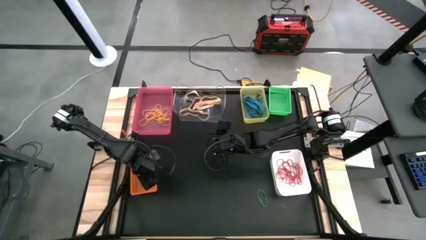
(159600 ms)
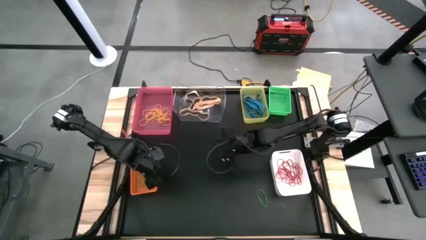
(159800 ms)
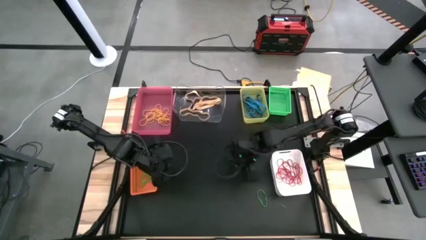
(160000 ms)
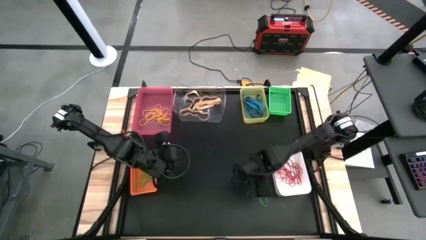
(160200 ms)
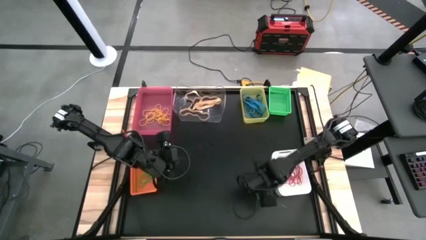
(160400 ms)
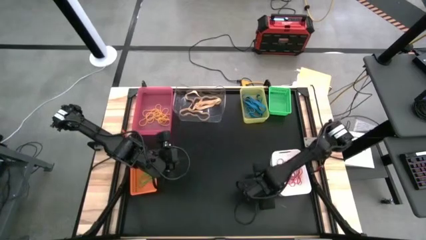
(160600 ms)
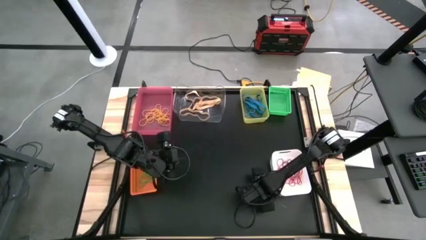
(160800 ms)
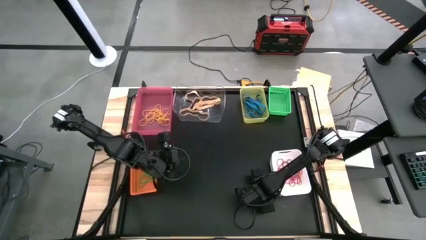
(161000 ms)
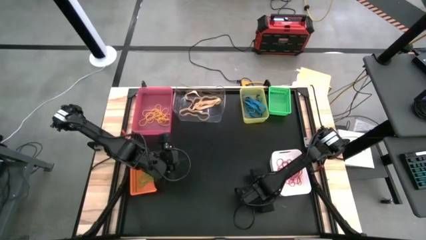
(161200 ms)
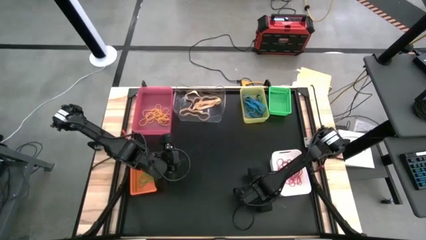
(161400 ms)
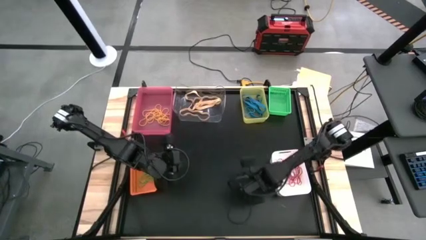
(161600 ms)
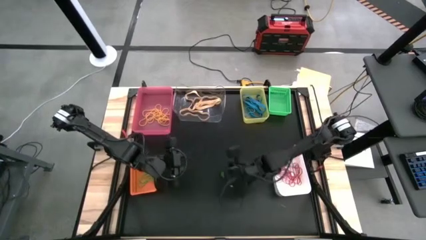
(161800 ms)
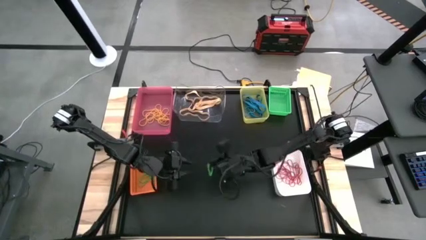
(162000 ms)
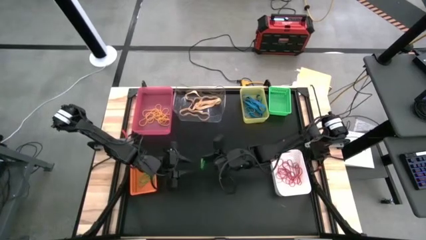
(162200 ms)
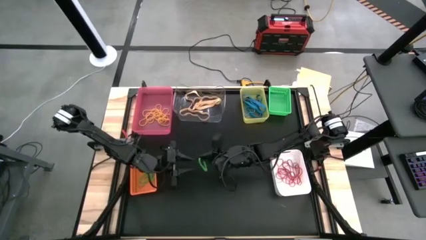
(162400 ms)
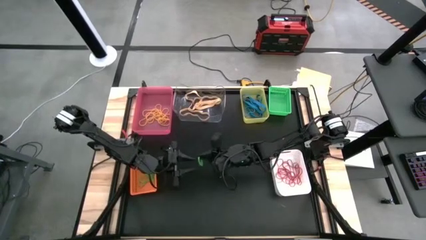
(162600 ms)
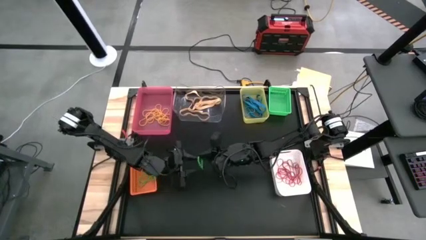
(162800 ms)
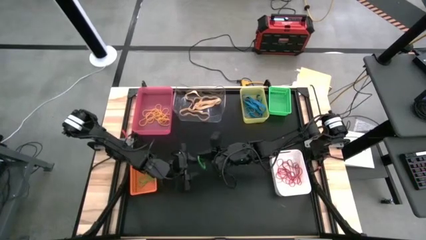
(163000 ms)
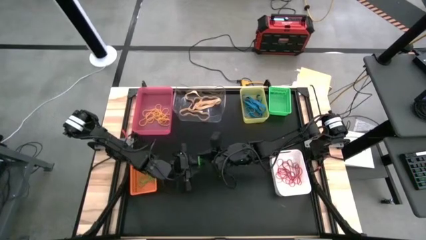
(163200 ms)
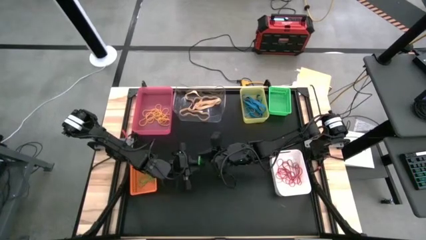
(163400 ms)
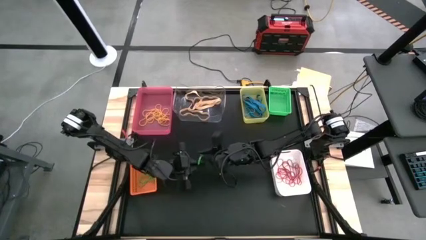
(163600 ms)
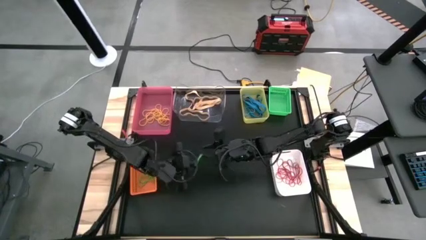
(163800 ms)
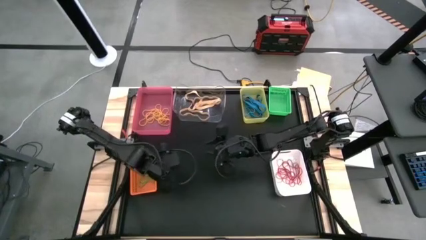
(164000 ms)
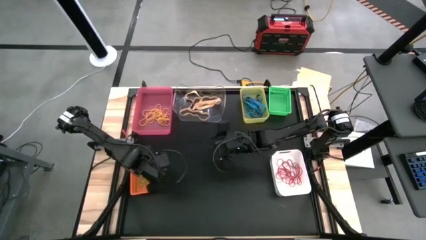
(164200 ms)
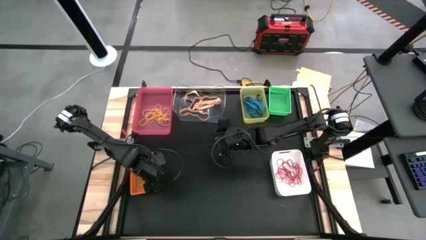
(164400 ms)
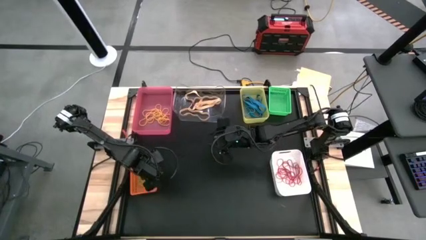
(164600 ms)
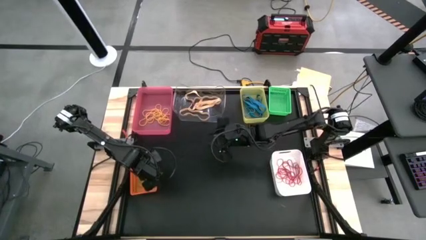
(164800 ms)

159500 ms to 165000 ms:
Task: Sort rubber bands into baskets
Put the green rubber band into the orange bin

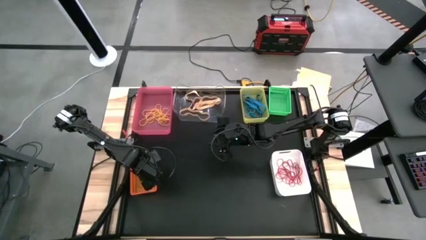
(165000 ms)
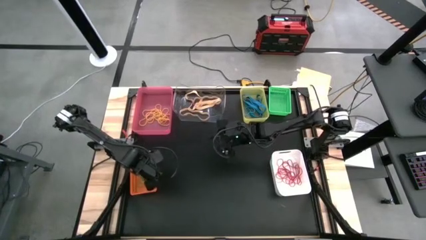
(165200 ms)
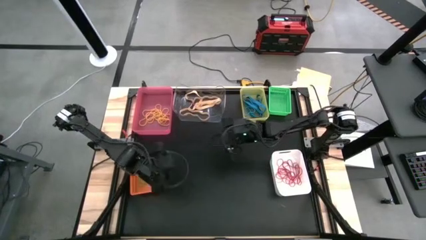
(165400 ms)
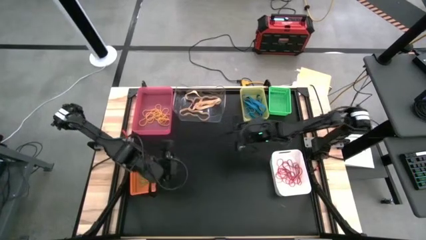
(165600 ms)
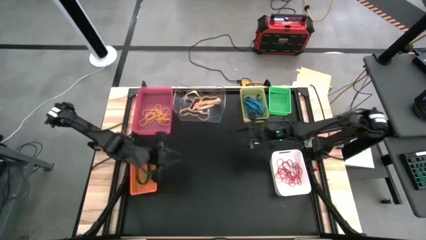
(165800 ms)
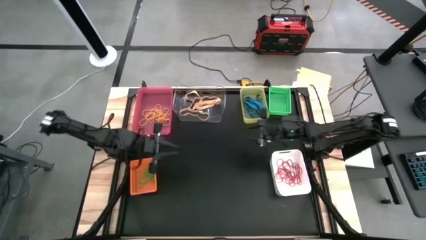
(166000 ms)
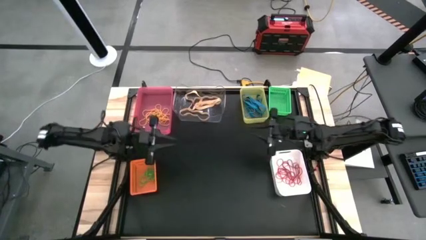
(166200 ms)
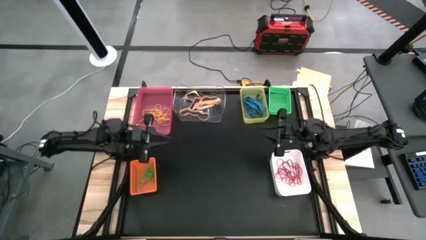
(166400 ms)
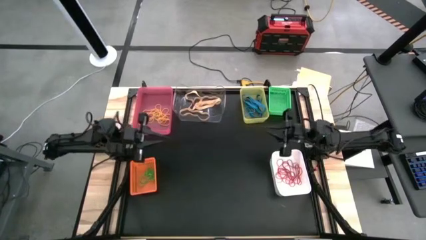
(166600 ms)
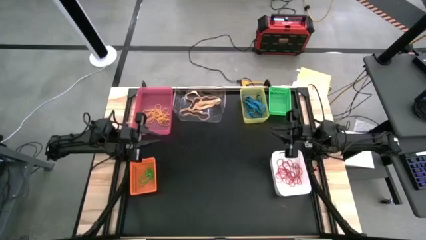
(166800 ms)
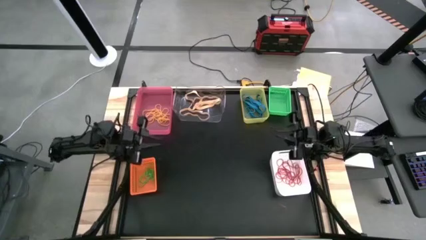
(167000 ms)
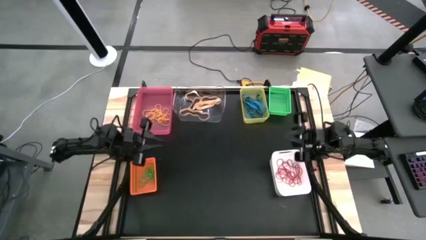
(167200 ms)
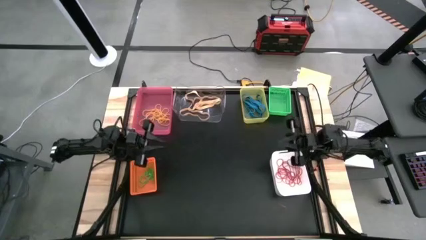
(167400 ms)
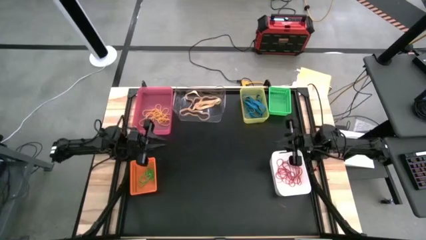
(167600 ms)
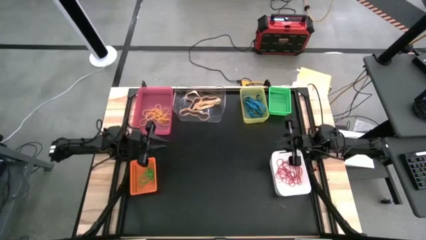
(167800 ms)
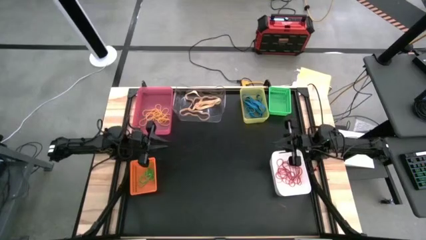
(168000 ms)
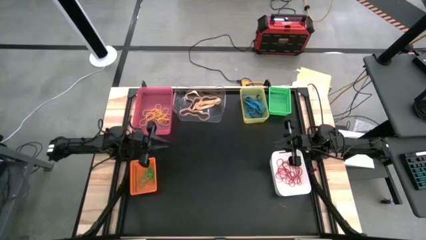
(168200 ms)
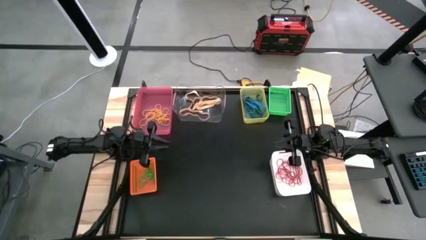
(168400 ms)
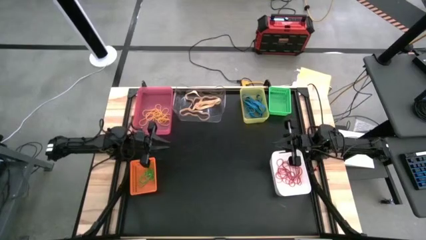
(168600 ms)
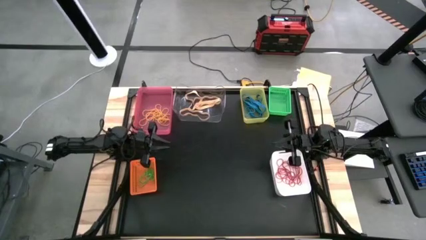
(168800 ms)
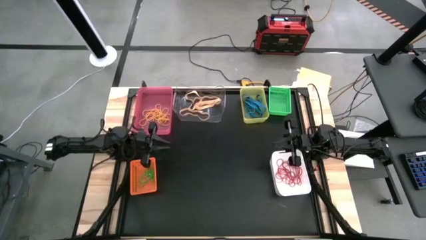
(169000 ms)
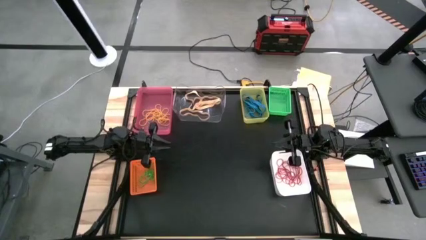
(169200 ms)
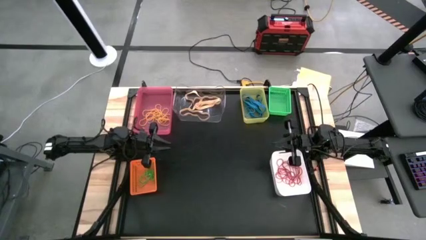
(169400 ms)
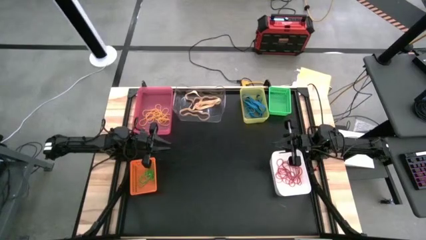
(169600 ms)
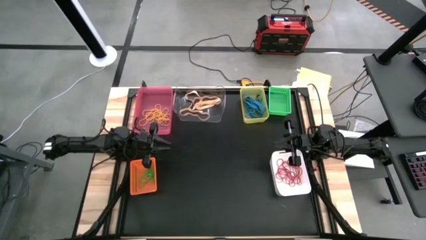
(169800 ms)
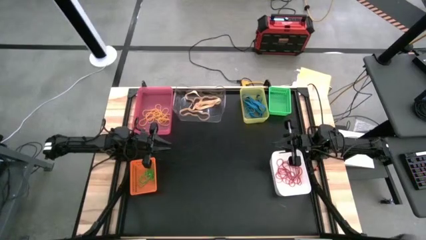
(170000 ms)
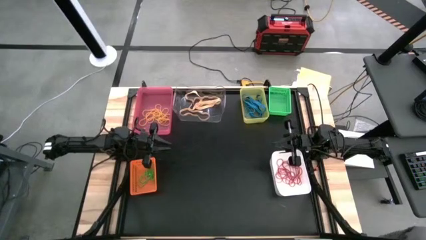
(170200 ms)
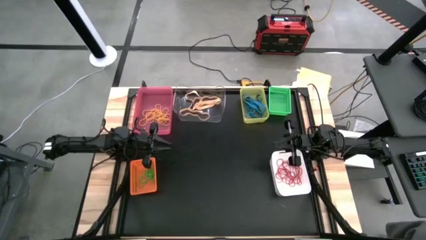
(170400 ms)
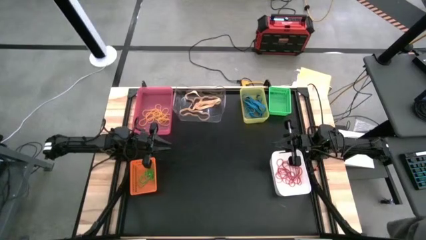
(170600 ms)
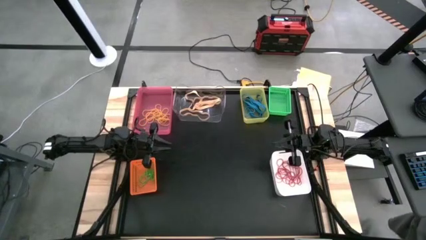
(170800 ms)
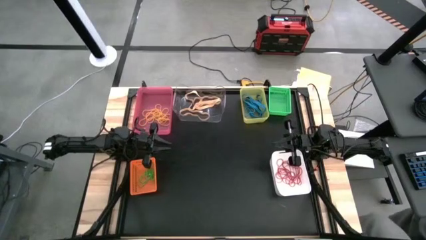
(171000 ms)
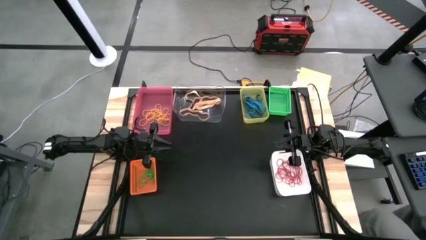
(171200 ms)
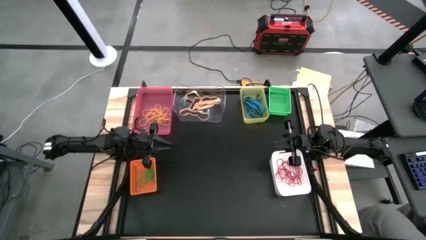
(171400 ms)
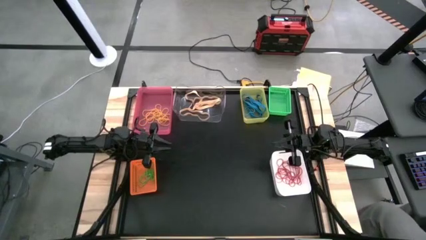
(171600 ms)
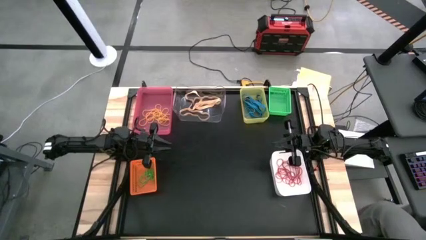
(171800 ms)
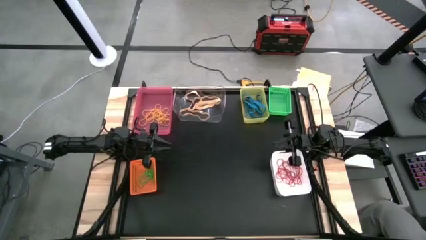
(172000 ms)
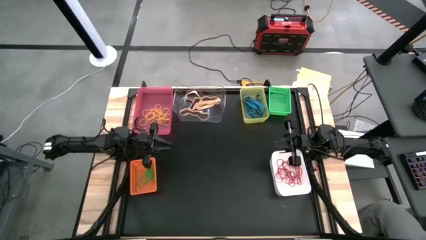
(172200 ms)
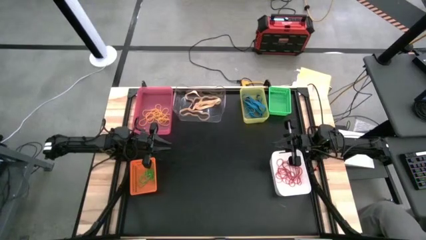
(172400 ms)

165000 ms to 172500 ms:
Return to Home Position

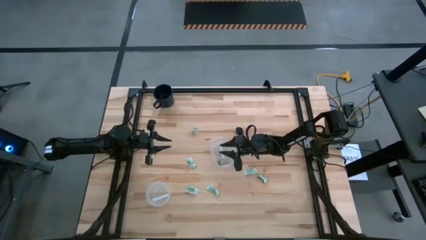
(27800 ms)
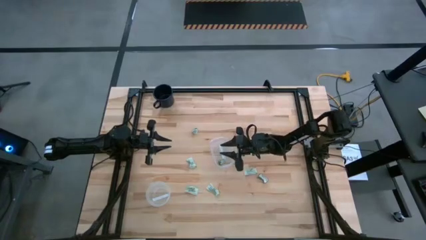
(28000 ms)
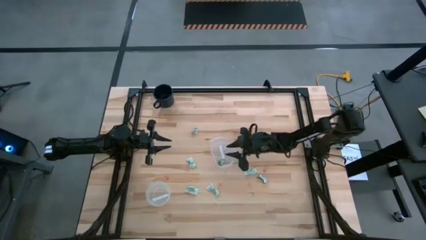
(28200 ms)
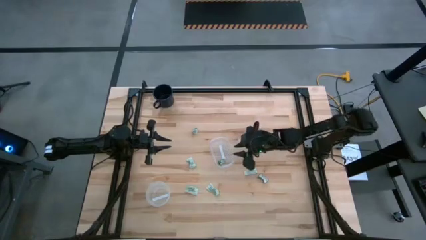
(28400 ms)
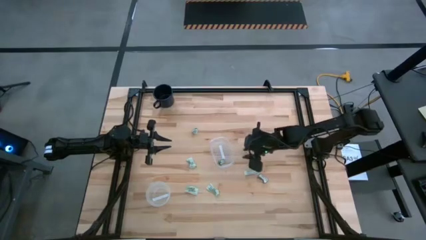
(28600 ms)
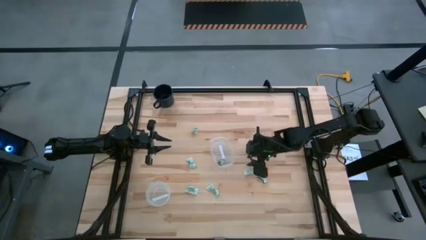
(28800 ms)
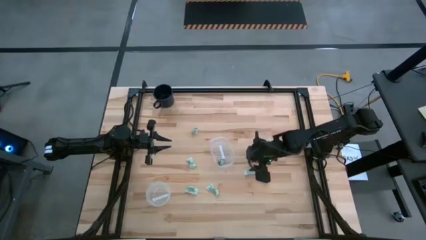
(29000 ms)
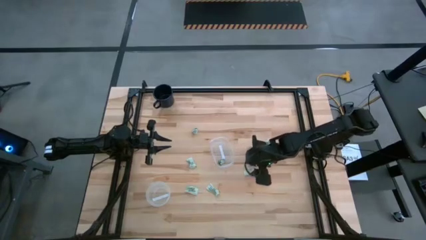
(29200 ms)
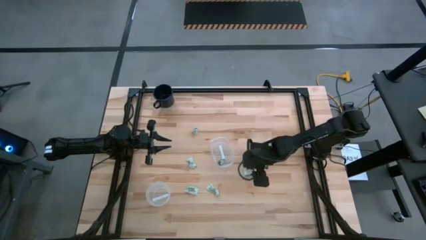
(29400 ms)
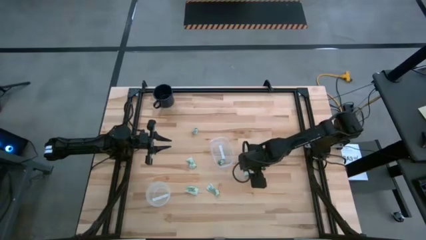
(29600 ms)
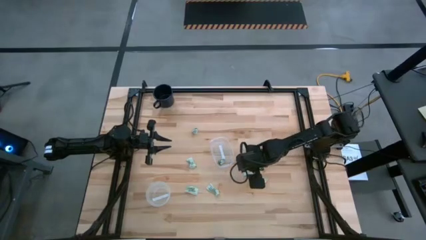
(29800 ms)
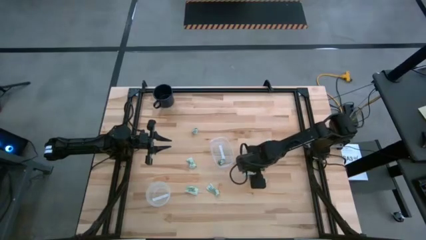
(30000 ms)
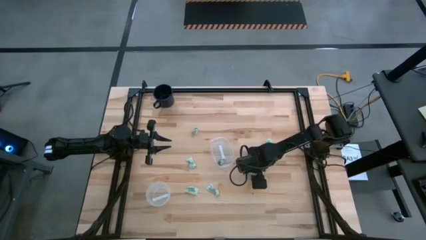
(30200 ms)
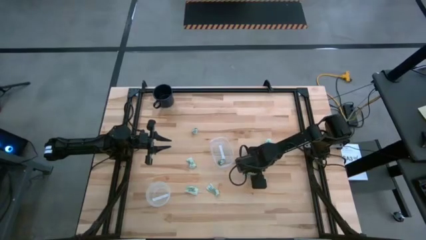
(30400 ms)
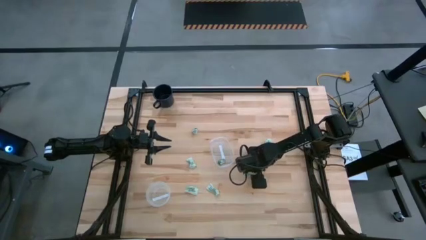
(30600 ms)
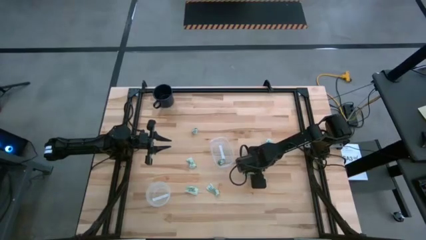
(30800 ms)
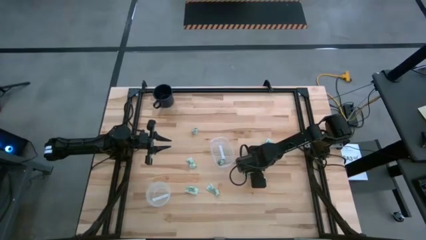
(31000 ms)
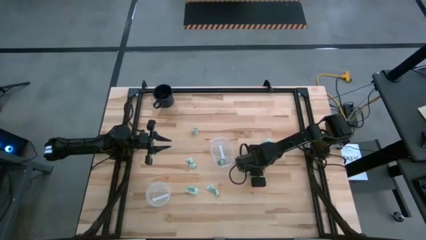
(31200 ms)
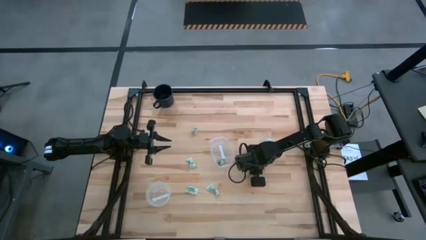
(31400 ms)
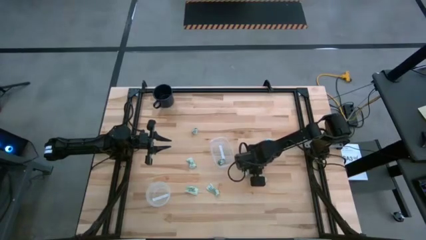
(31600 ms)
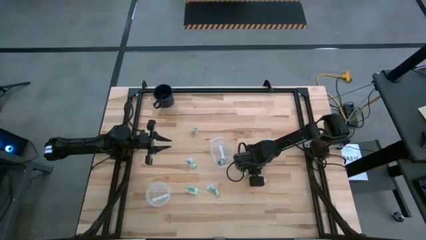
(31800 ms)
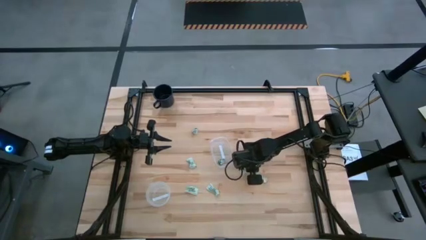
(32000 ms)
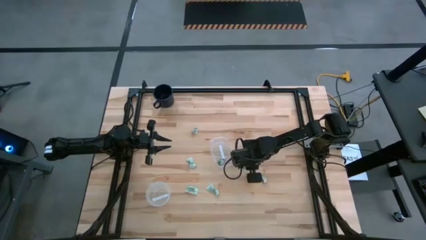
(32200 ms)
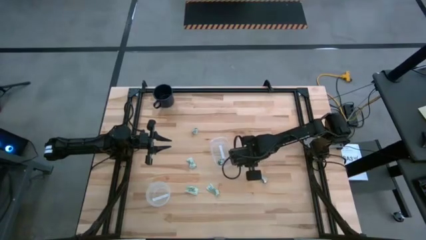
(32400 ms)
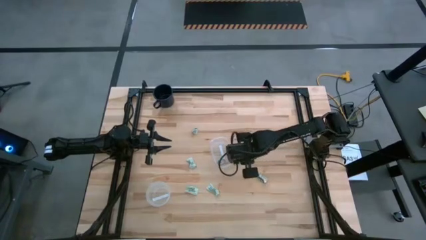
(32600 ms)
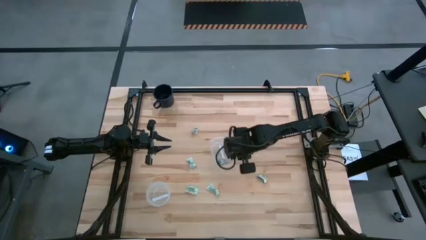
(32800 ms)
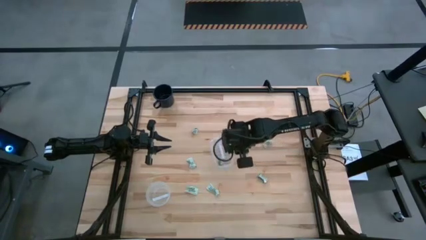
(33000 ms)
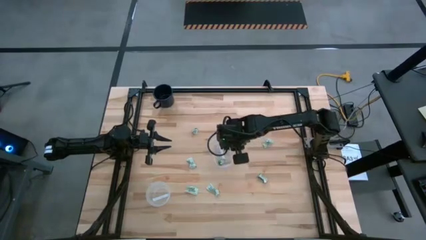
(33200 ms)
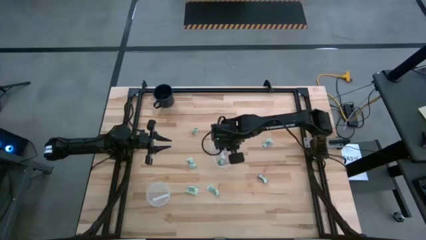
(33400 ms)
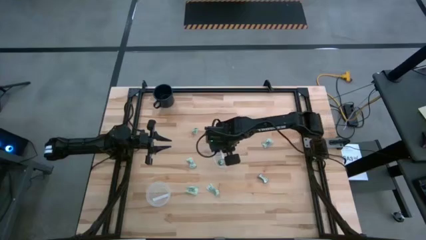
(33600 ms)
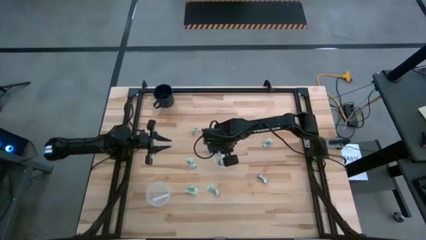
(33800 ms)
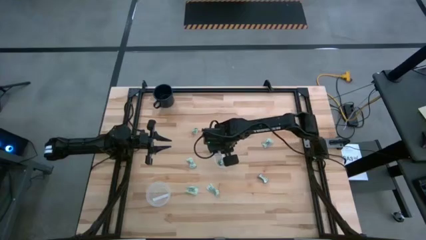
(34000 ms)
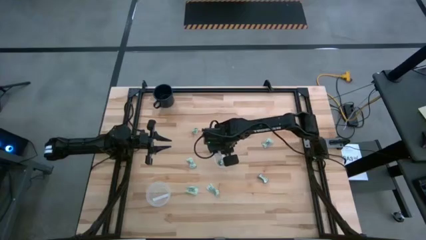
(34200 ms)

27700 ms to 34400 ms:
Task: Pick and place items into bin
Put the stevia packet into the transparent bin
